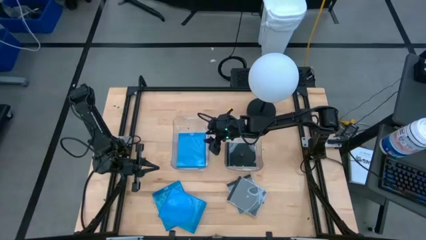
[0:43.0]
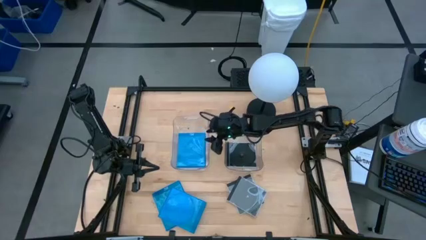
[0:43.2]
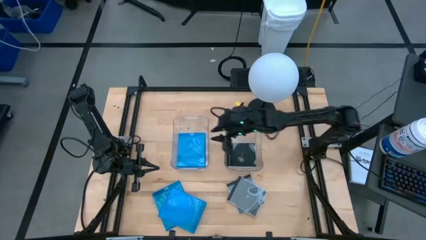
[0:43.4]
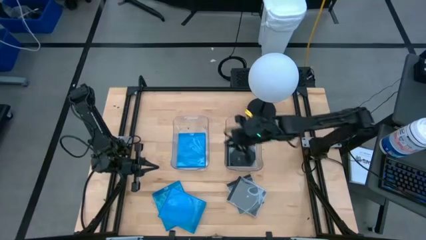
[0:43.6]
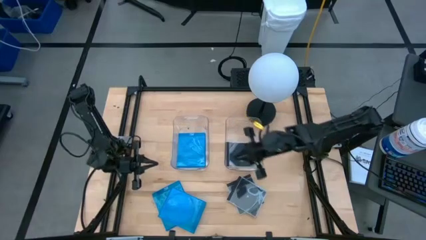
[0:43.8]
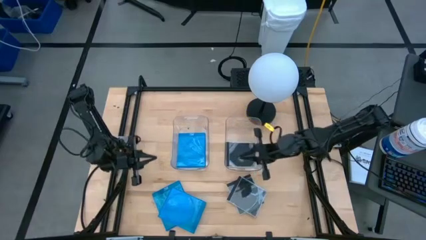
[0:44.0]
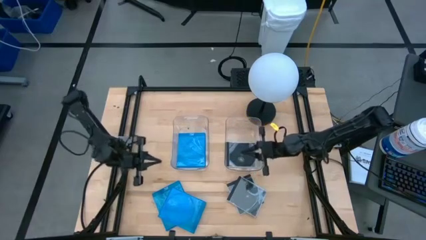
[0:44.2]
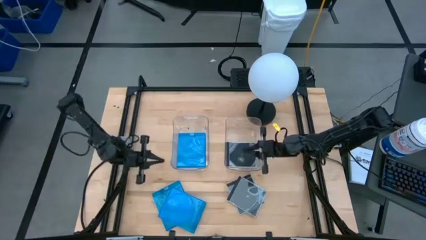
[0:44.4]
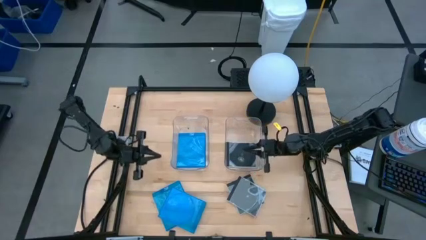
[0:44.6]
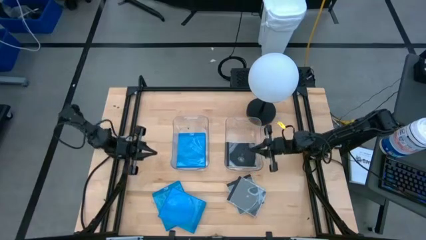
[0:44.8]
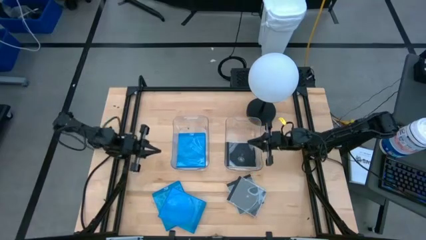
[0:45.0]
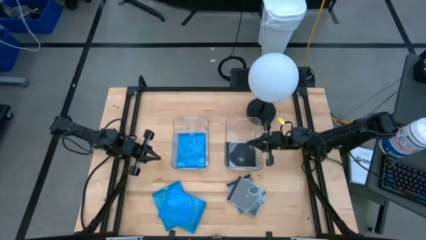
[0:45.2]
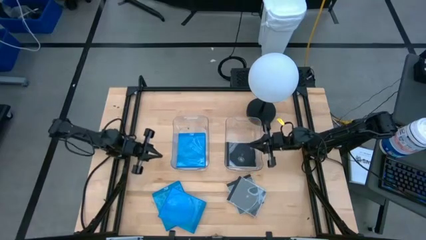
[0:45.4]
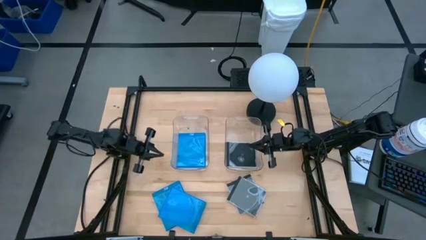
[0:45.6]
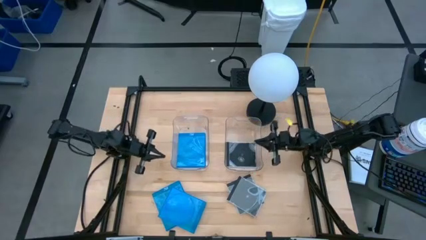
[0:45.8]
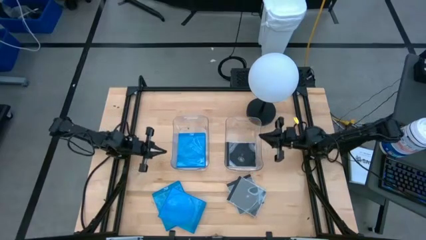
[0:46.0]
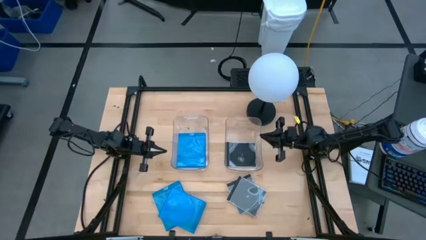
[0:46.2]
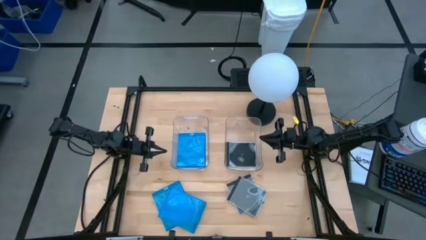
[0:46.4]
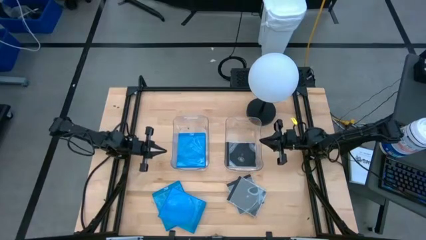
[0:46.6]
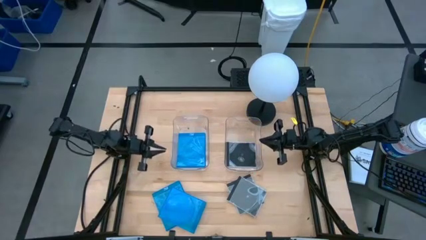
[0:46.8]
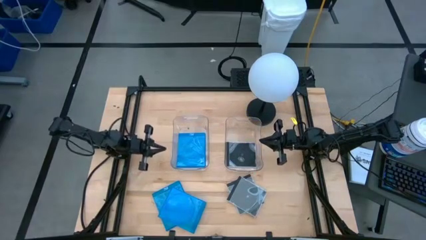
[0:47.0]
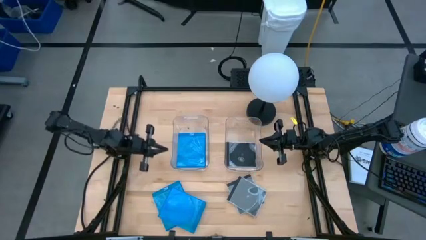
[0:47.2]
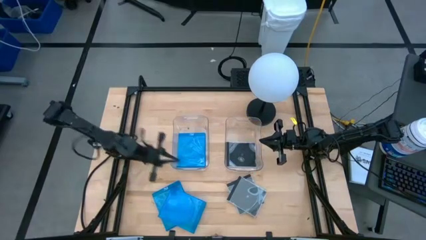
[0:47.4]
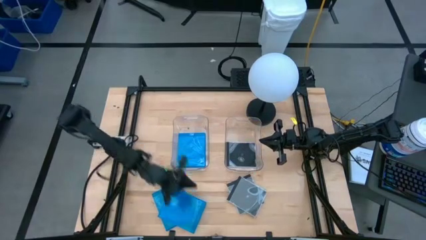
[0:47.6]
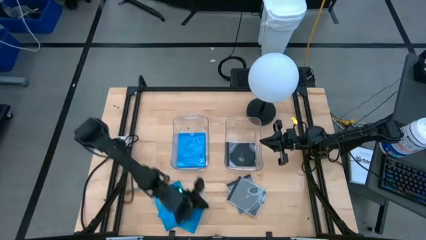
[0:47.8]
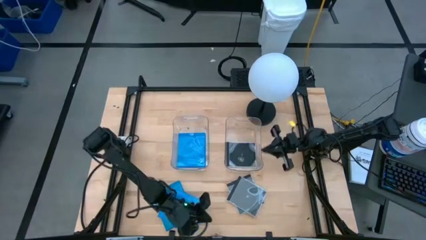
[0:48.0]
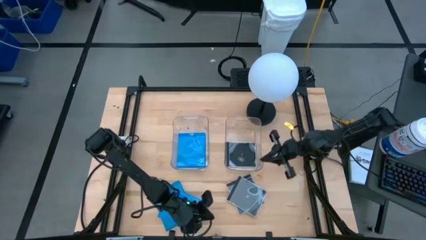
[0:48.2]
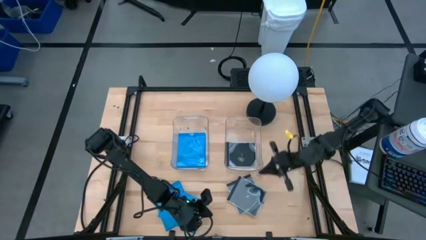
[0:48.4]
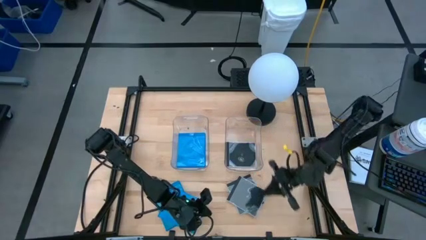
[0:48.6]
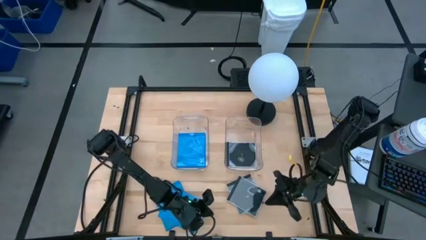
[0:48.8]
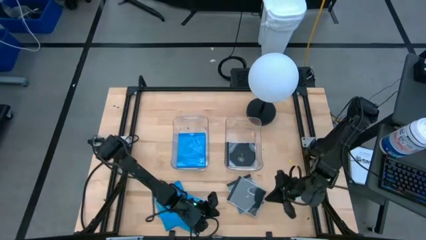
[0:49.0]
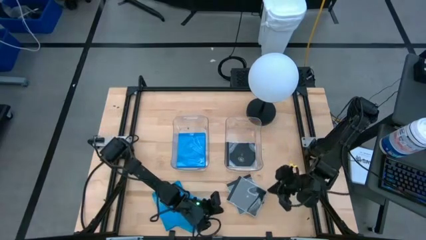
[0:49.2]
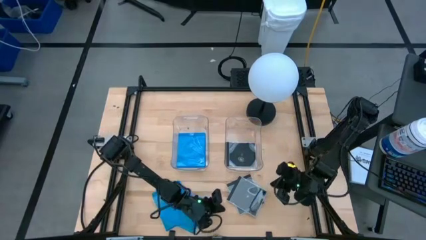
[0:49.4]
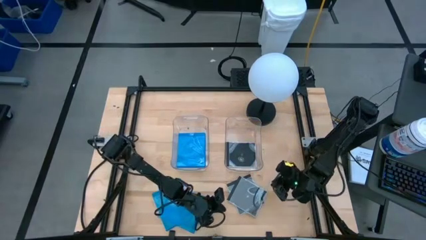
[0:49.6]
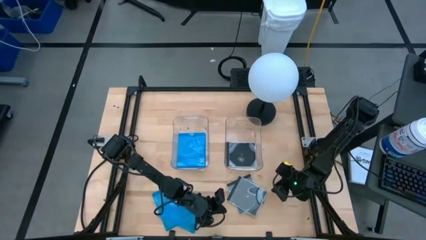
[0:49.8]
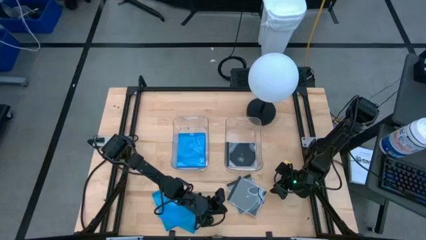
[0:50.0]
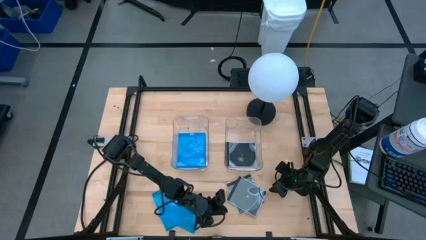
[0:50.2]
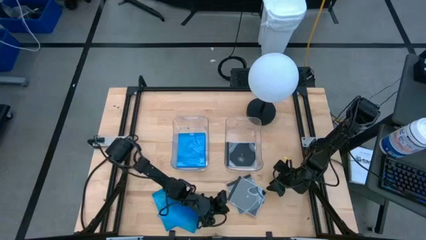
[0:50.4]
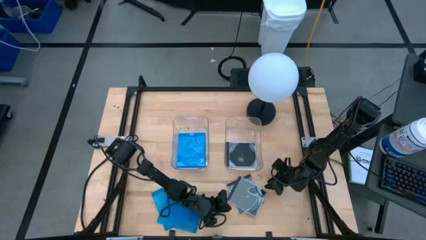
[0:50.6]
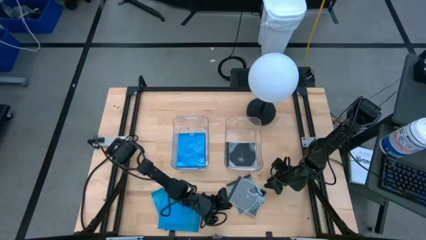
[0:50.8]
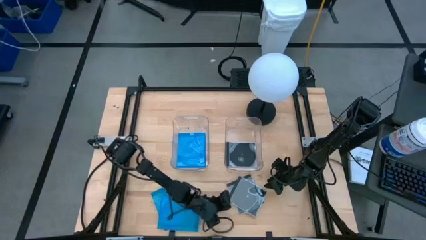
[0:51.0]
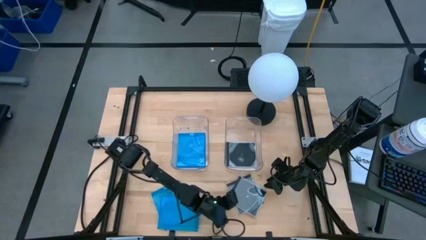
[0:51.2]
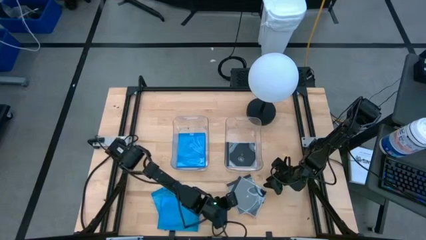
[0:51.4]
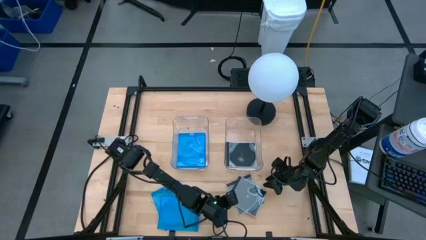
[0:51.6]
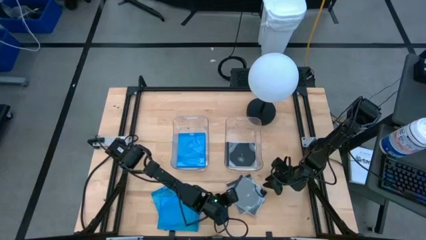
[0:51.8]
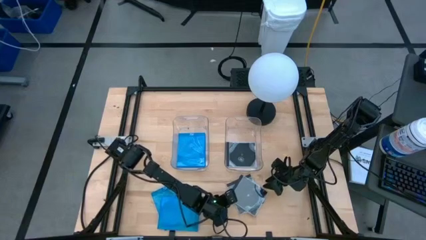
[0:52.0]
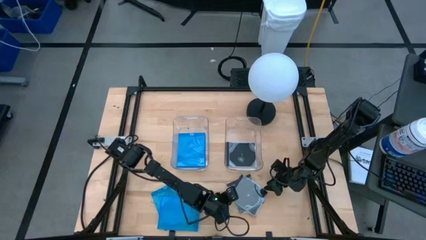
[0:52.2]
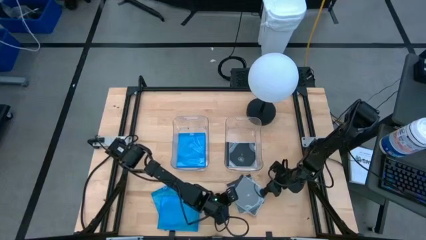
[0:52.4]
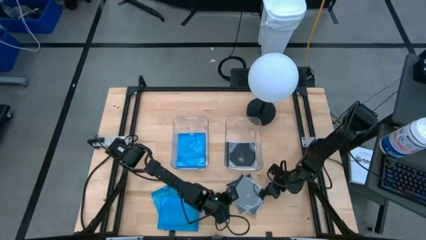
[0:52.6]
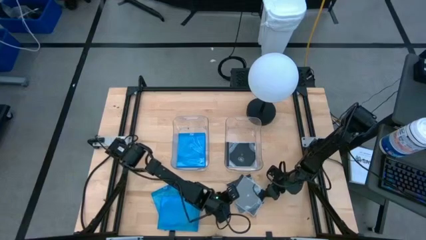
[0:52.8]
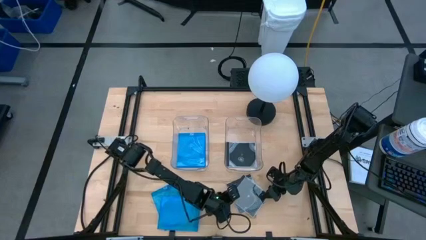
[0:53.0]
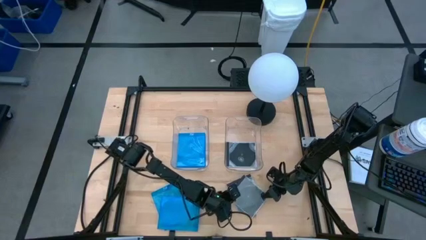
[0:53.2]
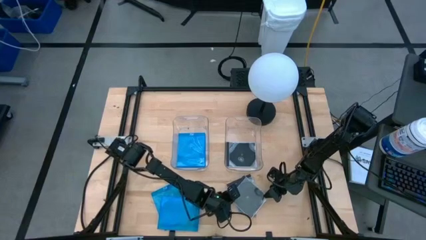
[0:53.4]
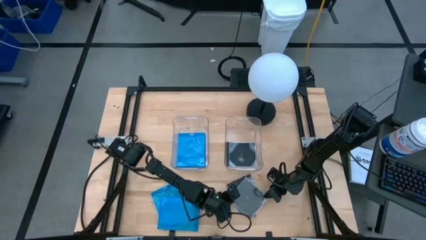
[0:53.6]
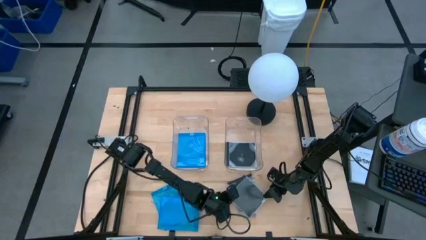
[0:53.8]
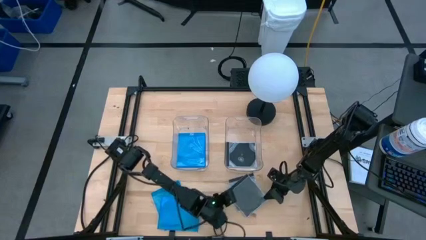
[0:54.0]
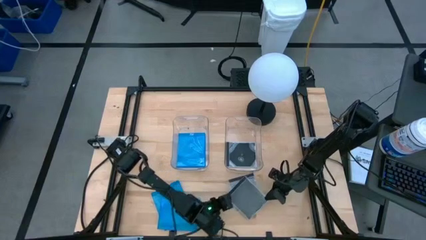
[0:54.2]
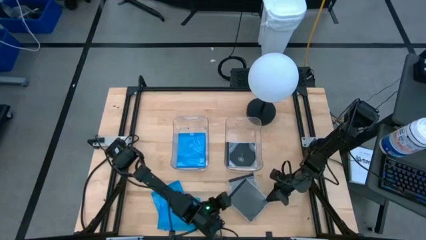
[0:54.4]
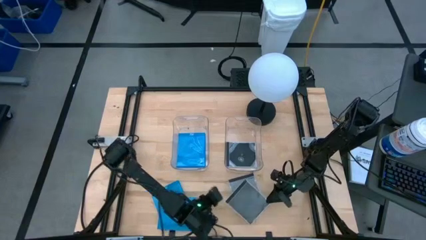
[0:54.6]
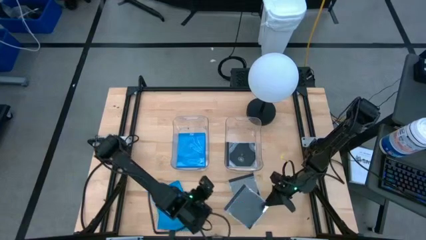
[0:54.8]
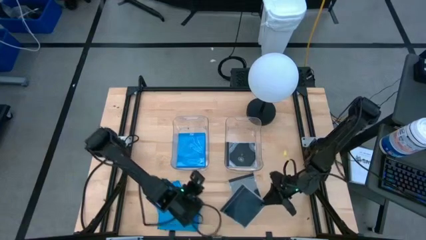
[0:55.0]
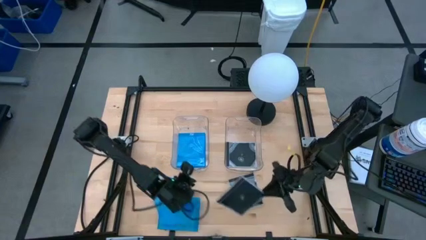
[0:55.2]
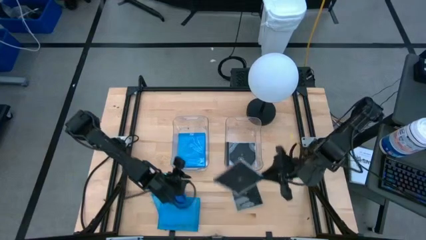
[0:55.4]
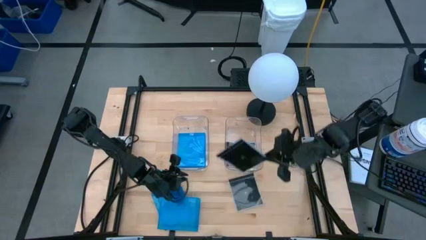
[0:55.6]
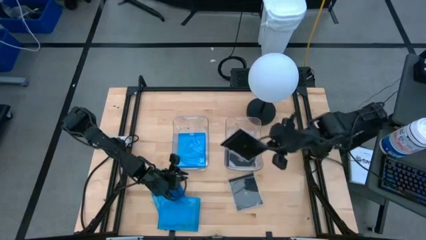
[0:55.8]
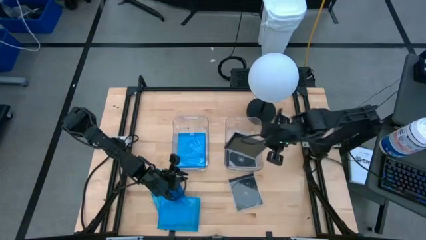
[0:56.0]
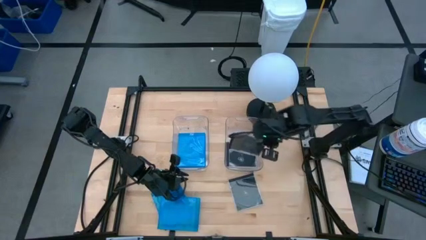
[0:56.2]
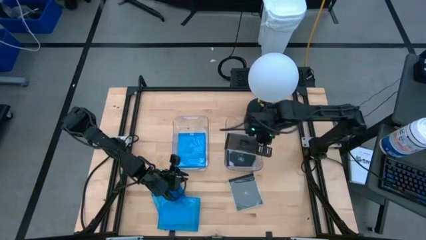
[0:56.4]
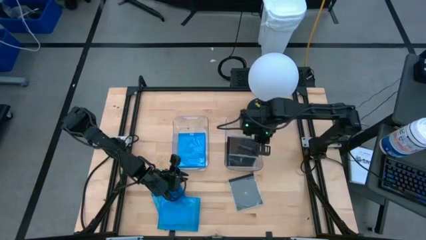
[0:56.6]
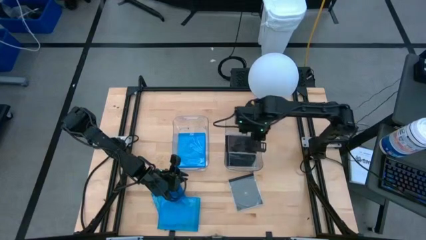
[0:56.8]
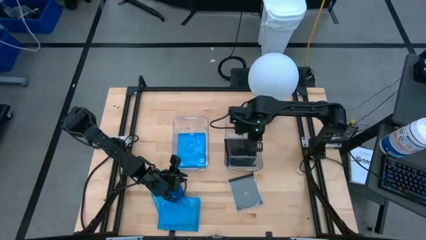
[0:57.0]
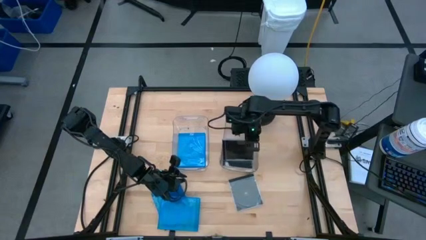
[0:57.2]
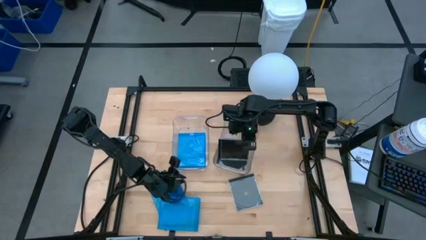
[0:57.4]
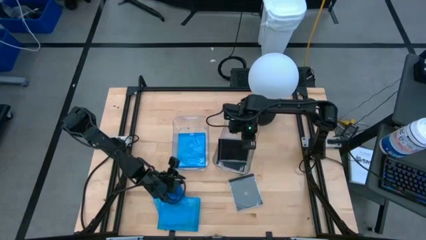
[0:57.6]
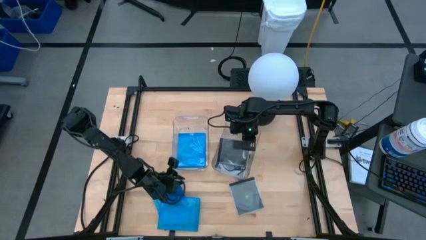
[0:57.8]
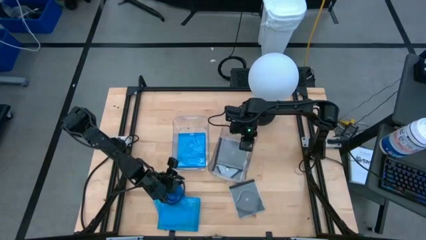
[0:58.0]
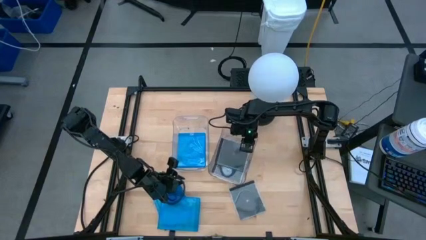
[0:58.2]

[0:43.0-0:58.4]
Task: Pick & place jewel cases by type
Put the black CD case into the right transparent bin

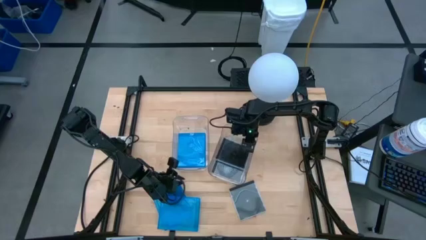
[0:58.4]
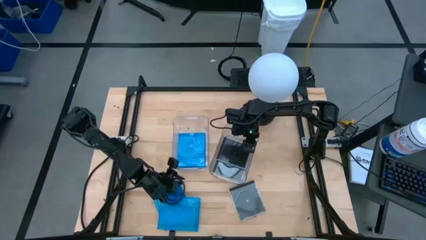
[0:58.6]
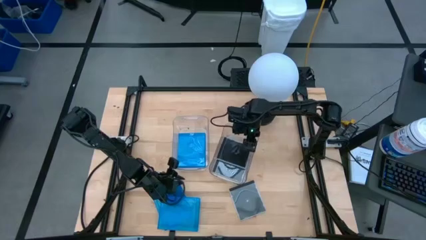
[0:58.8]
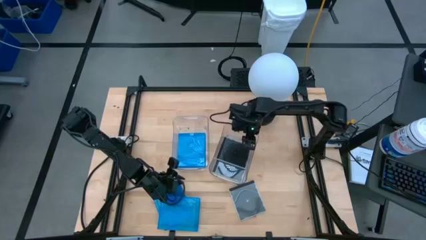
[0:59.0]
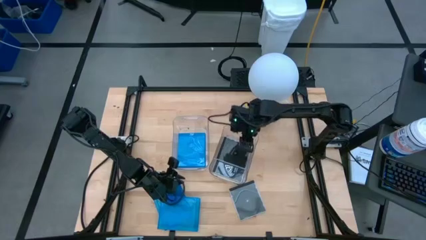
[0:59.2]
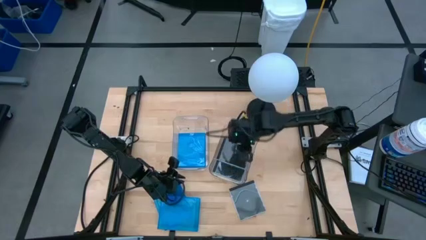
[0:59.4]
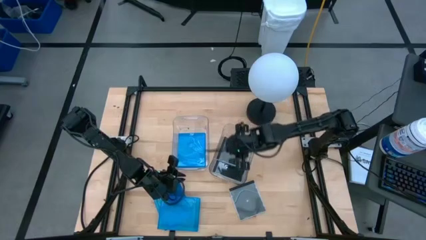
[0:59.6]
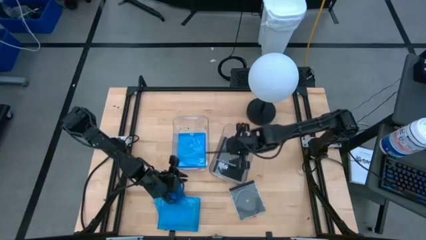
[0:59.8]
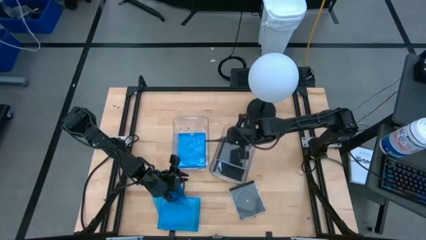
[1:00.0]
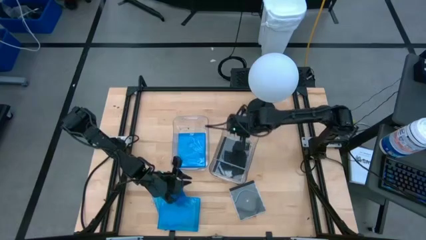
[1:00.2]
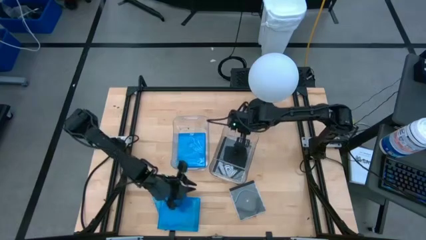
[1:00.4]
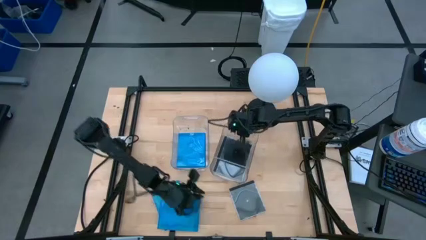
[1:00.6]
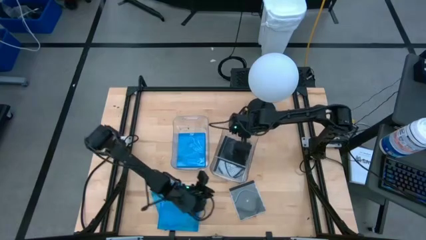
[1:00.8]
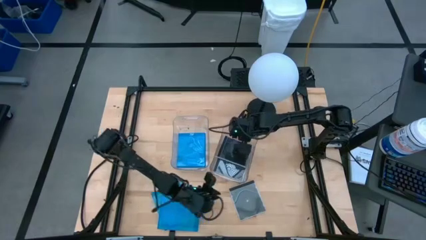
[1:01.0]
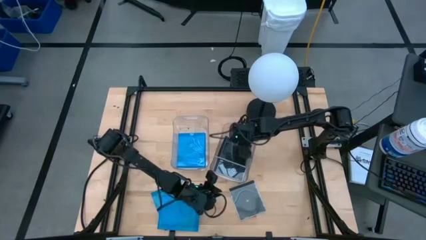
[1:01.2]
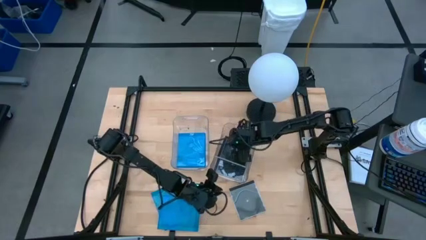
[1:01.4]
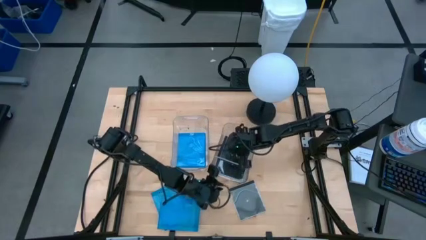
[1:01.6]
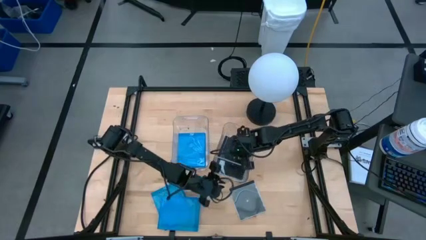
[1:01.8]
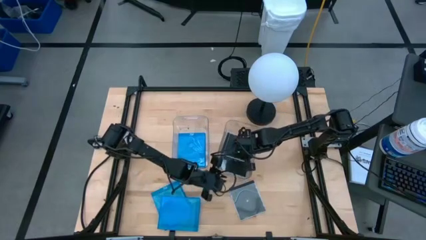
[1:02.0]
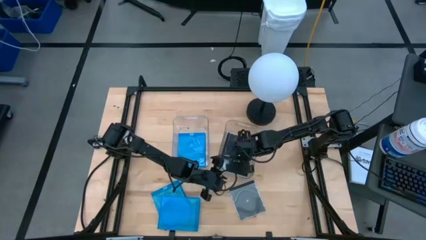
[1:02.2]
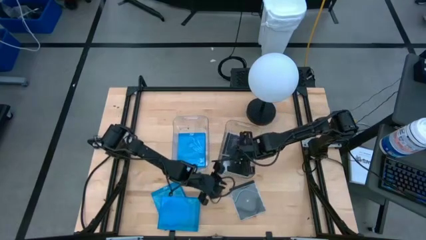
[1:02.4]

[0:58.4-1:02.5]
Adjust the right transparent bin
